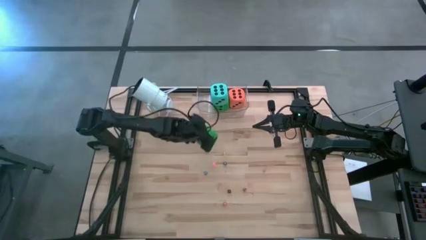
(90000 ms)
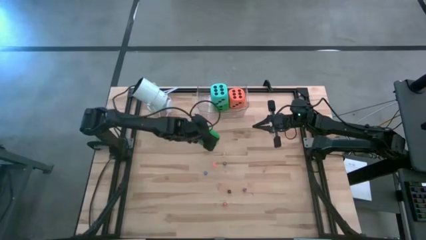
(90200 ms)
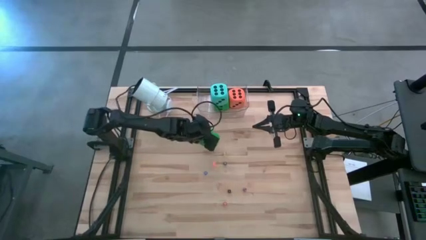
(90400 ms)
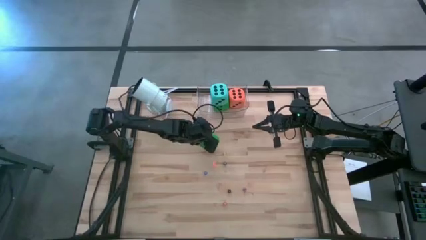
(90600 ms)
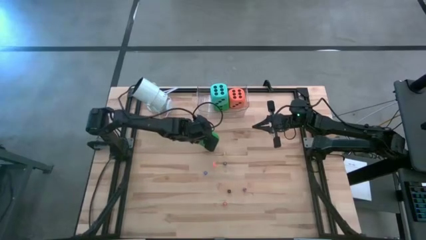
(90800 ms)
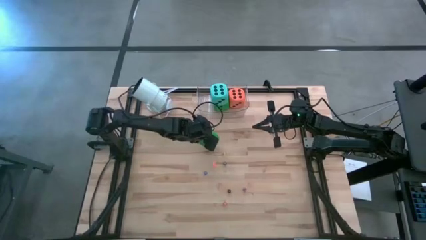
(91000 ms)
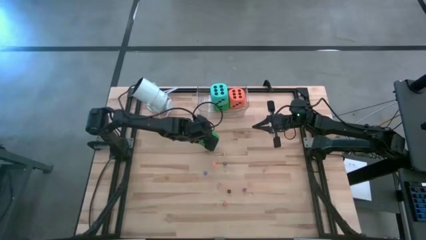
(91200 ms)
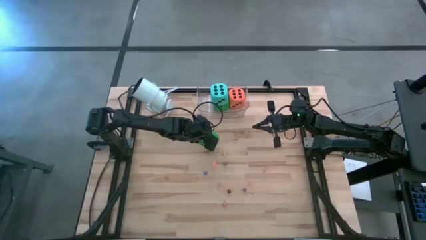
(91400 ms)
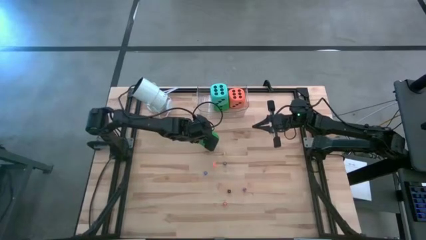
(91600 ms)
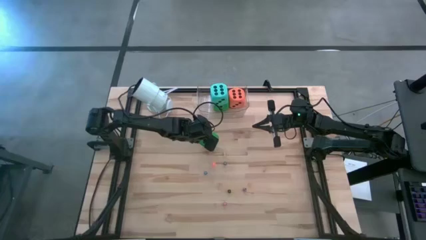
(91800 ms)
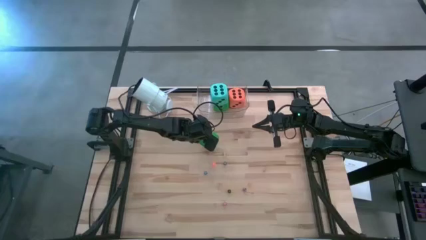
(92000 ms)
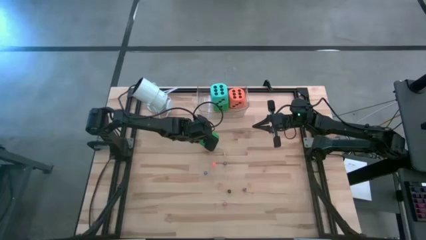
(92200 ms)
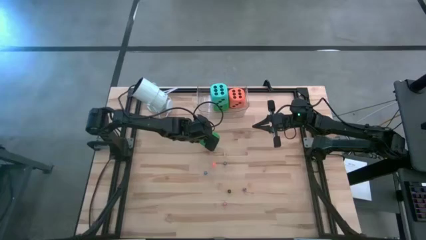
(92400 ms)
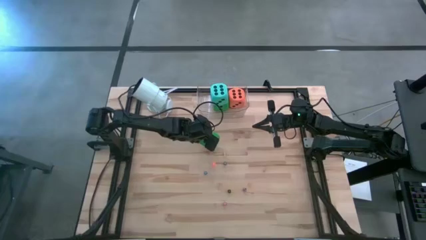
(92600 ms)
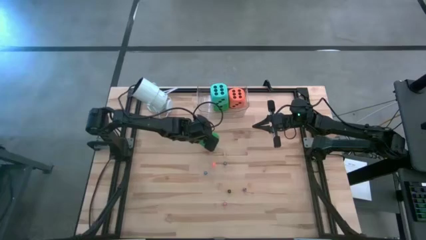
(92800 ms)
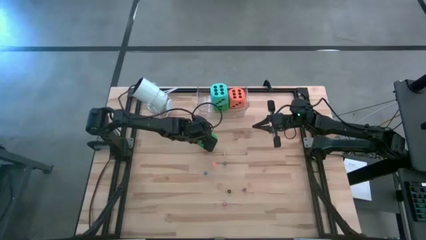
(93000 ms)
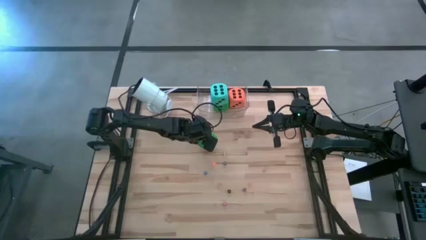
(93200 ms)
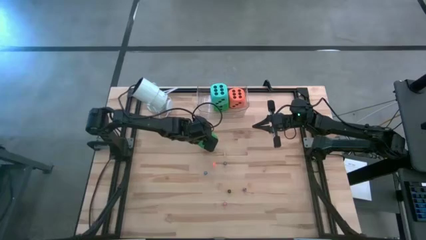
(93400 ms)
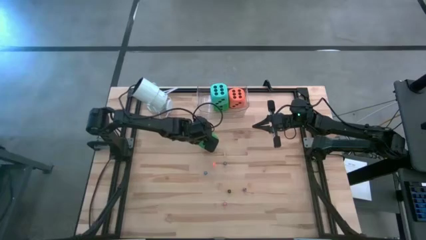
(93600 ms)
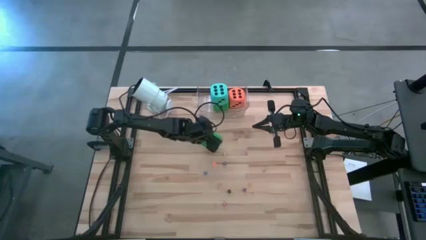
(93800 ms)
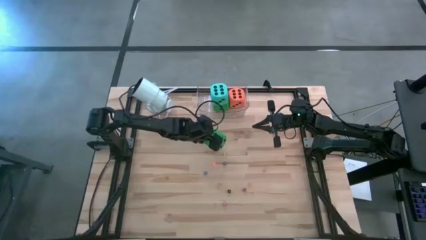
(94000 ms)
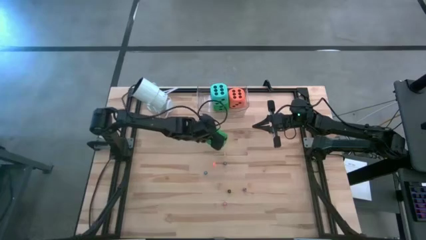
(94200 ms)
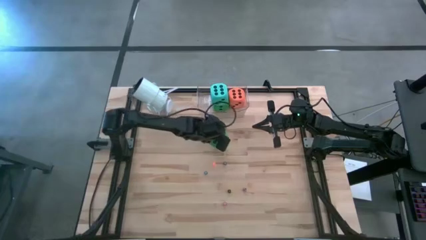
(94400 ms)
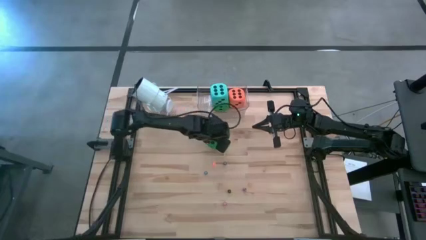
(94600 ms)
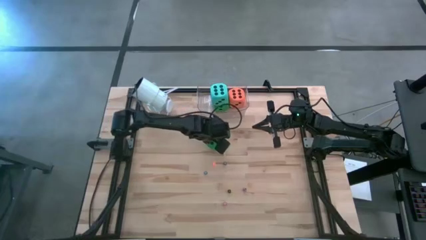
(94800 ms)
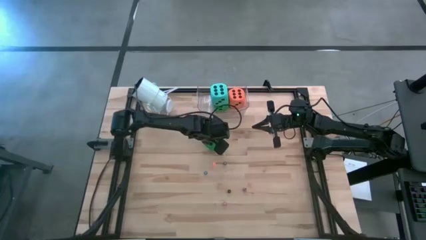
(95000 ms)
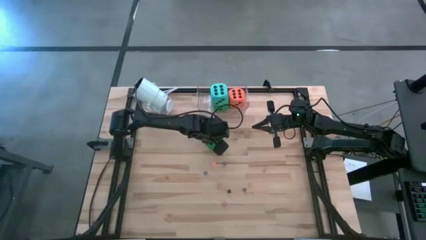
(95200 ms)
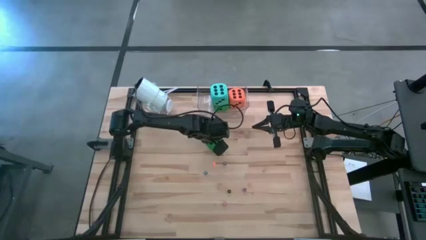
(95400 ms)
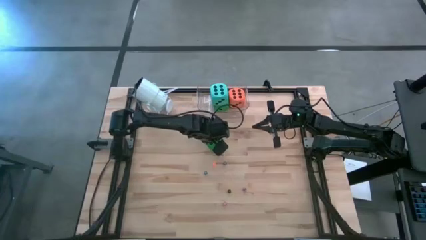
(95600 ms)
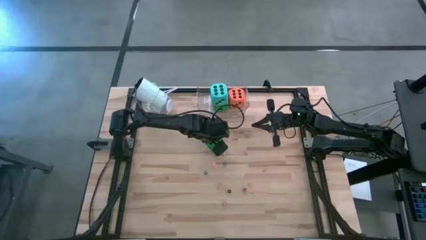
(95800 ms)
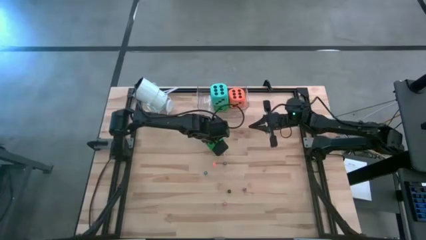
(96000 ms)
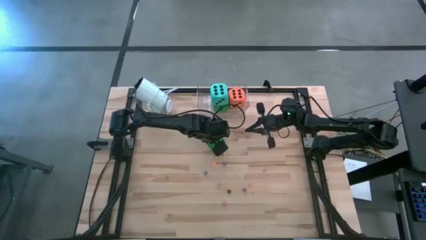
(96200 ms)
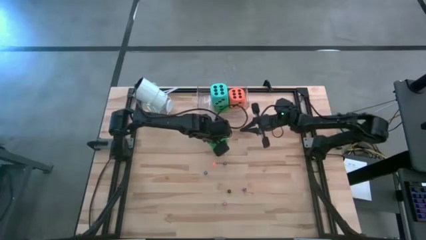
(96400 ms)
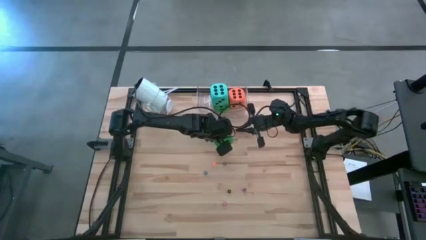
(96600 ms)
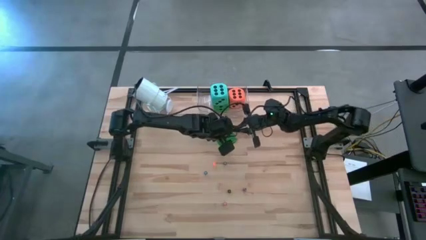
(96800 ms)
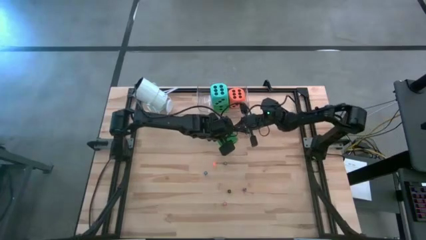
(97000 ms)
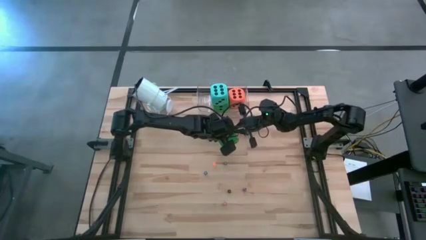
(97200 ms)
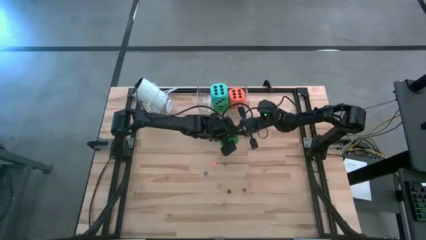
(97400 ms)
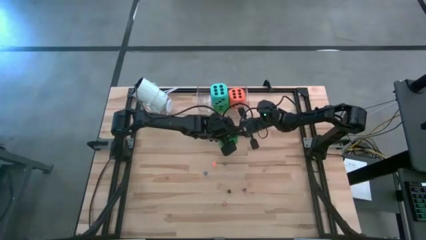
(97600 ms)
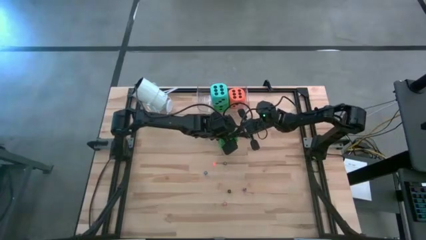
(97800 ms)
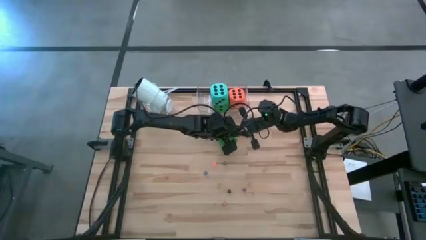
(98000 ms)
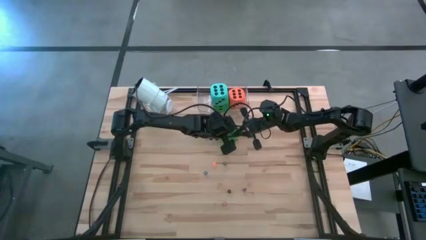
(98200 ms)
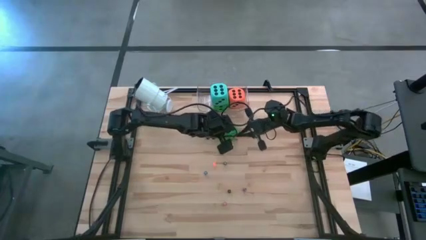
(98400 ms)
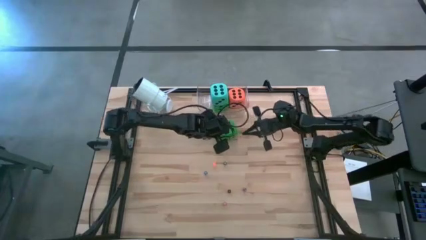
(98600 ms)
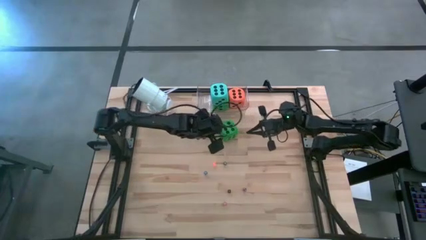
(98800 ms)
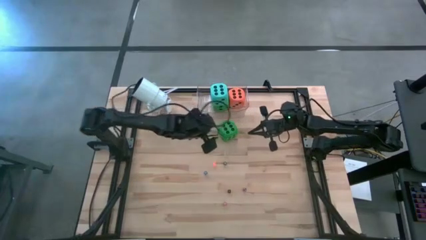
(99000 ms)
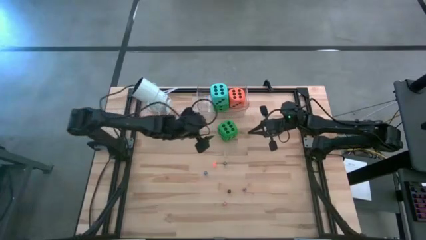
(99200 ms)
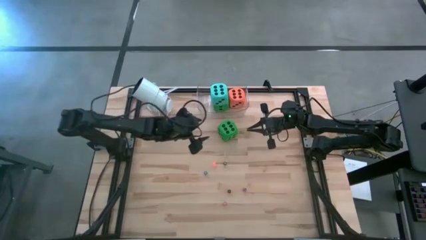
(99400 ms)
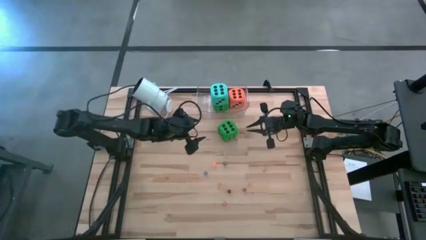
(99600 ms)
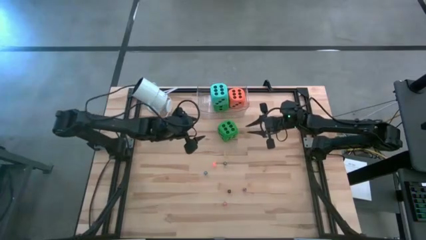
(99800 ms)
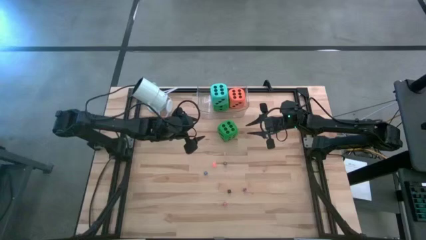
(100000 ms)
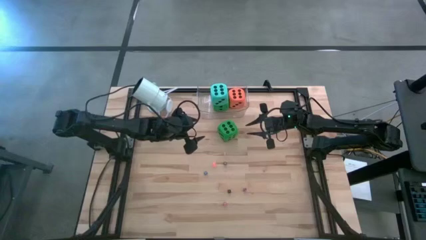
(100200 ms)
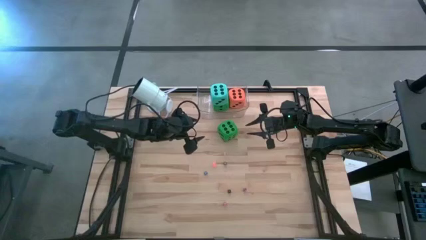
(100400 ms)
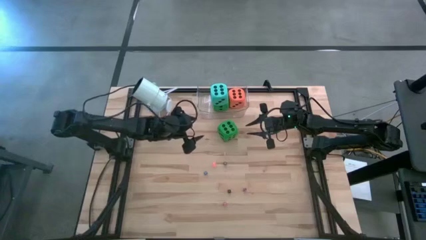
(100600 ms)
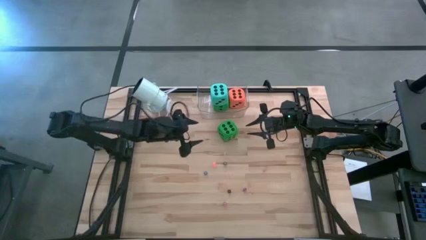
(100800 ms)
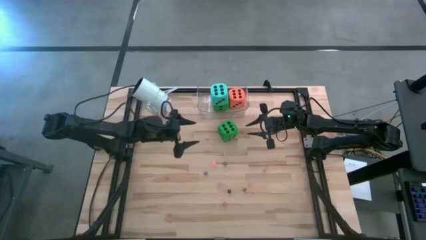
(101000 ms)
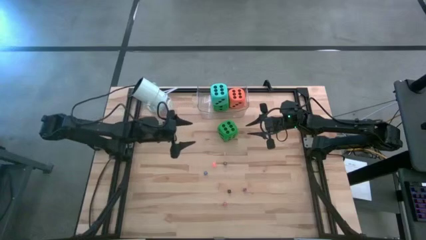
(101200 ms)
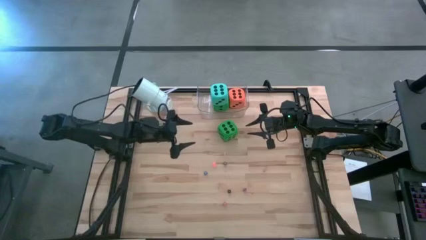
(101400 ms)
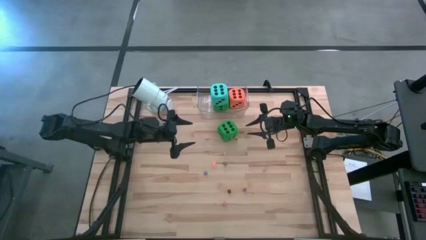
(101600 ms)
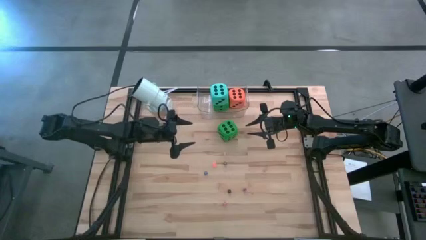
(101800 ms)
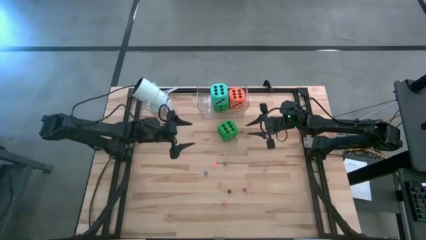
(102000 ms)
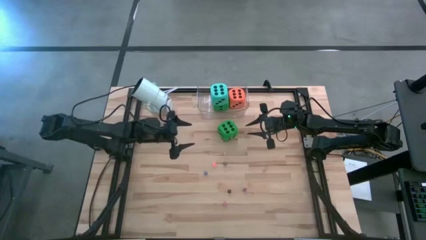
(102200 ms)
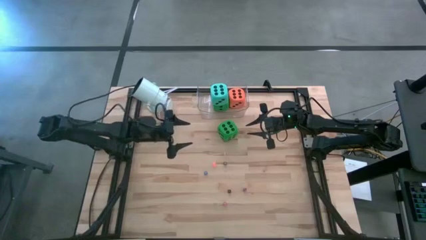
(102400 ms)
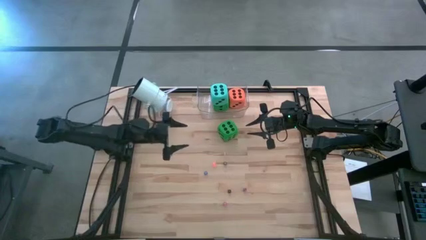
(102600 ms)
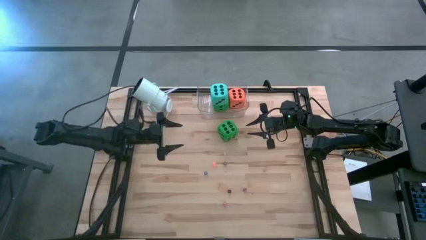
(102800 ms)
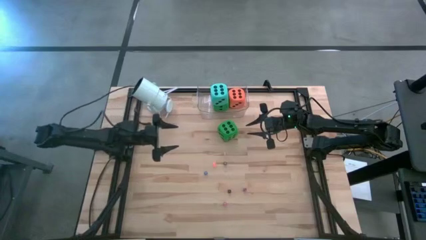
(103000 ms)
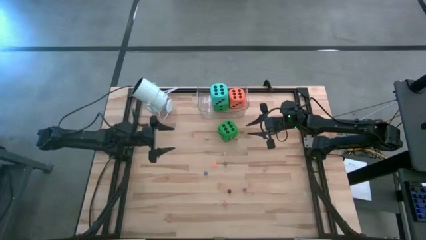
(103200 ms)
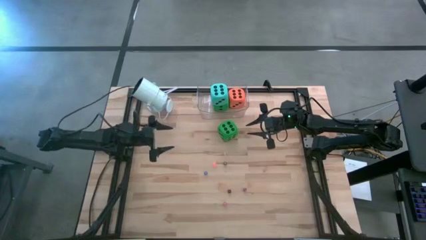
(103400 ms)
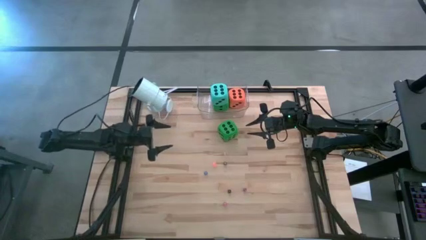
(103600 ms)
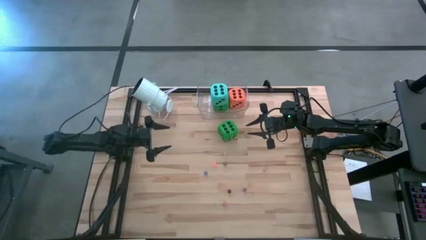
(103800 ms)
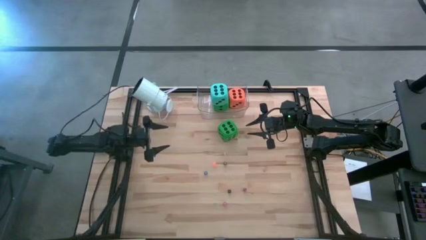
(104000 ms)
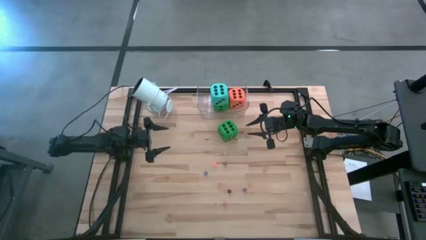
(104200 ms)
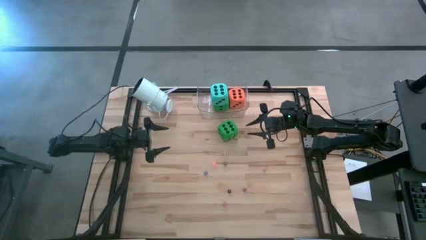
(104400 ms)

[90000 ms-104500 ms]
Task: Pick & Place Dice
Put the big green dice into the transparent bin
